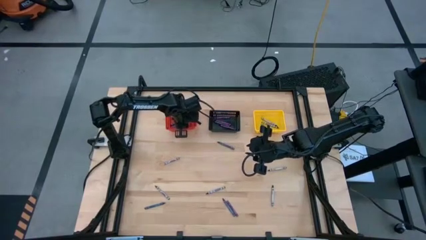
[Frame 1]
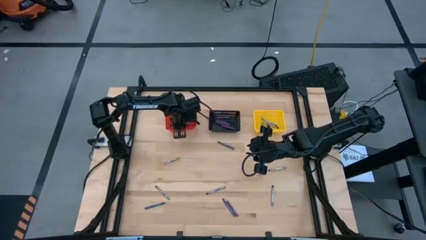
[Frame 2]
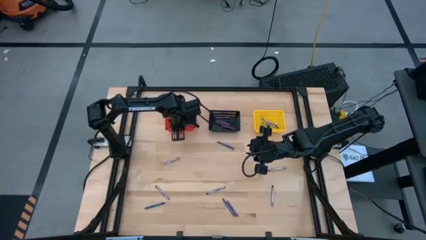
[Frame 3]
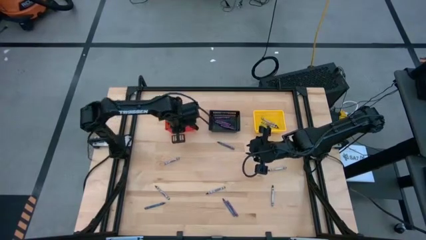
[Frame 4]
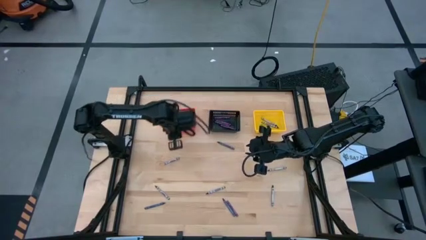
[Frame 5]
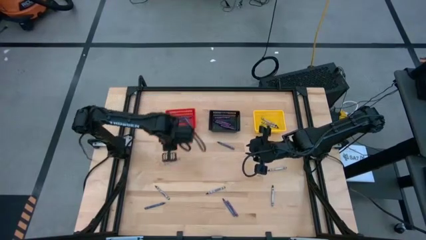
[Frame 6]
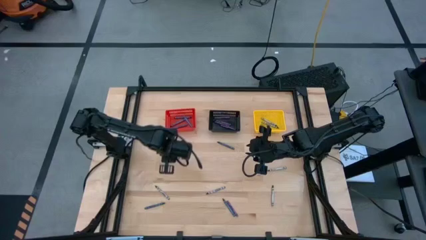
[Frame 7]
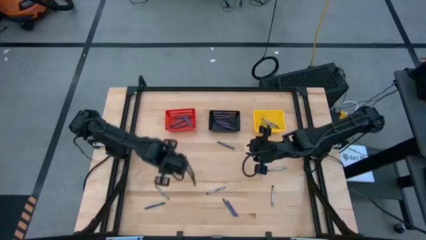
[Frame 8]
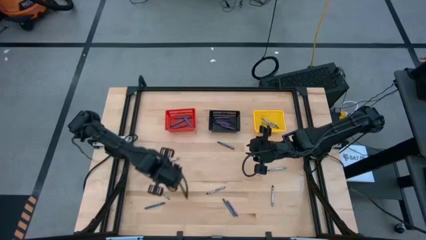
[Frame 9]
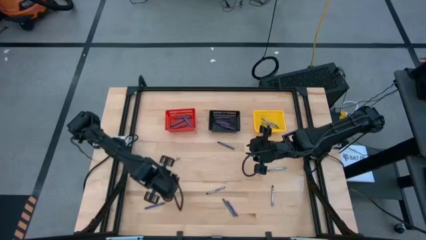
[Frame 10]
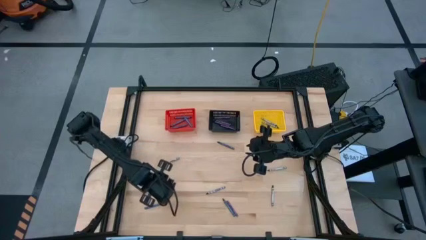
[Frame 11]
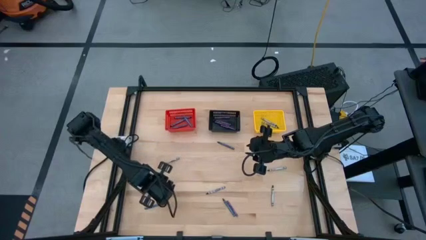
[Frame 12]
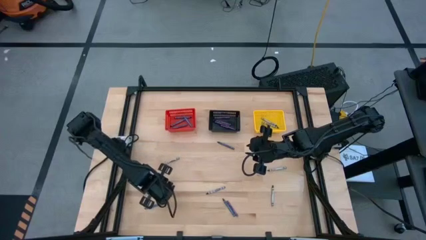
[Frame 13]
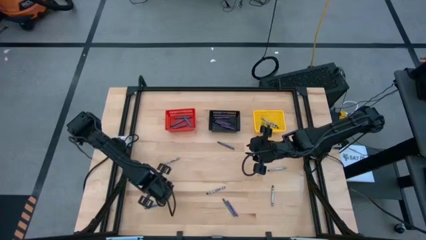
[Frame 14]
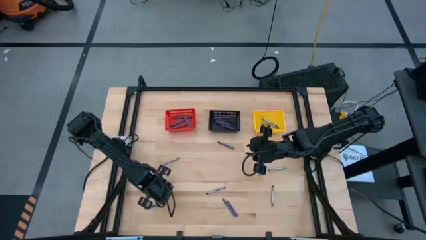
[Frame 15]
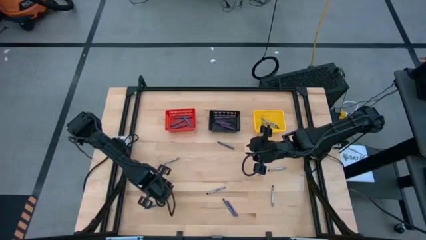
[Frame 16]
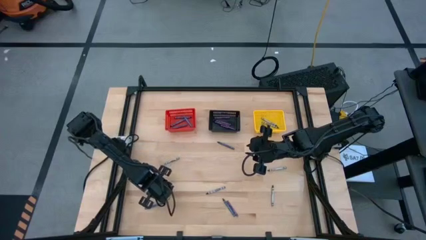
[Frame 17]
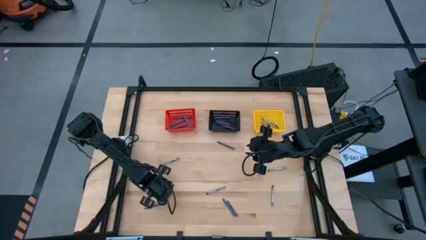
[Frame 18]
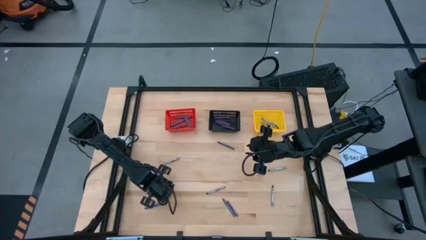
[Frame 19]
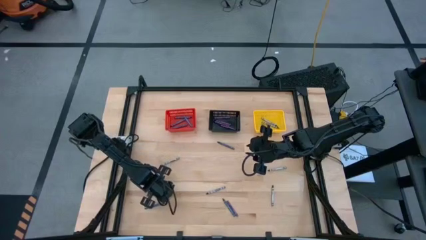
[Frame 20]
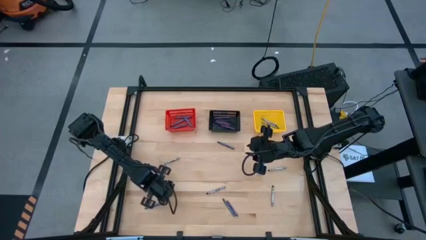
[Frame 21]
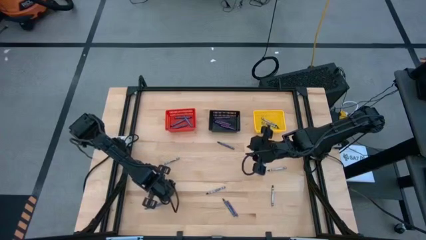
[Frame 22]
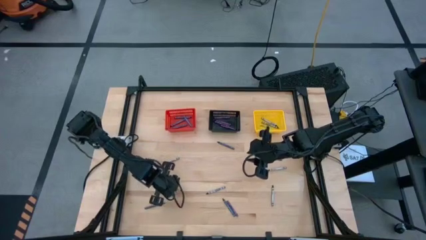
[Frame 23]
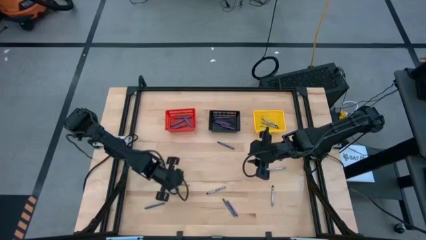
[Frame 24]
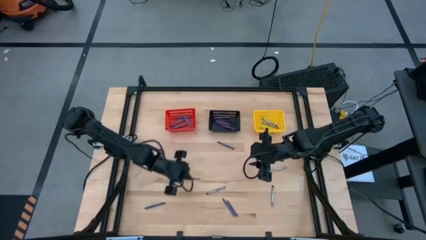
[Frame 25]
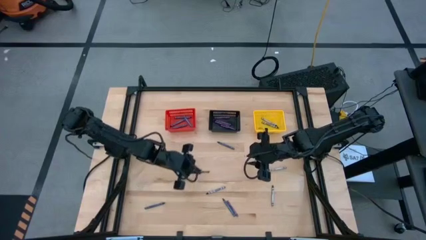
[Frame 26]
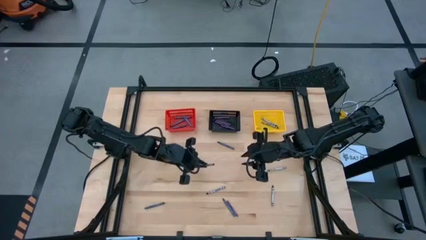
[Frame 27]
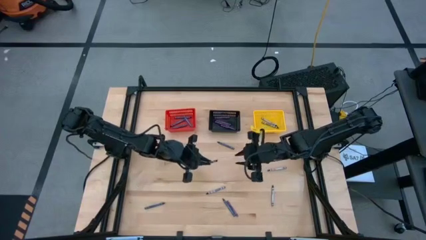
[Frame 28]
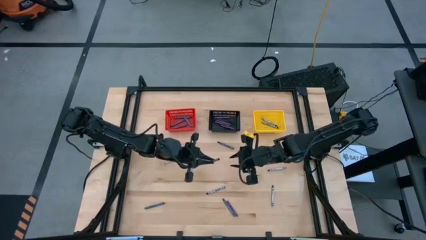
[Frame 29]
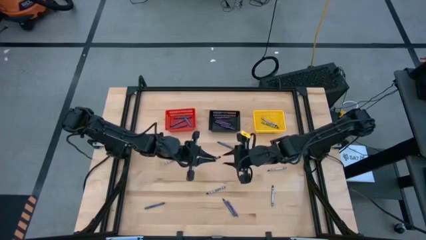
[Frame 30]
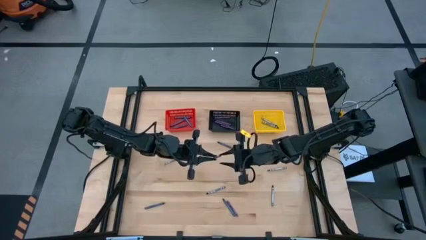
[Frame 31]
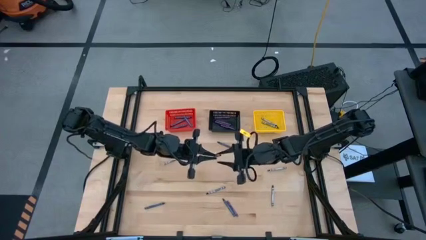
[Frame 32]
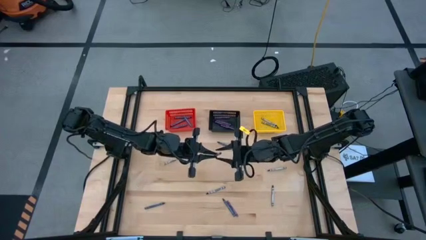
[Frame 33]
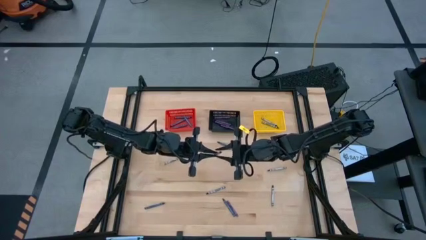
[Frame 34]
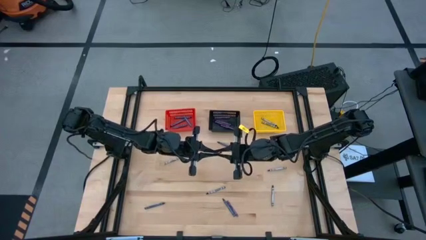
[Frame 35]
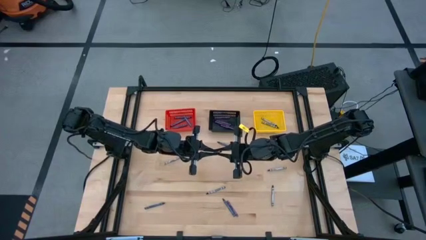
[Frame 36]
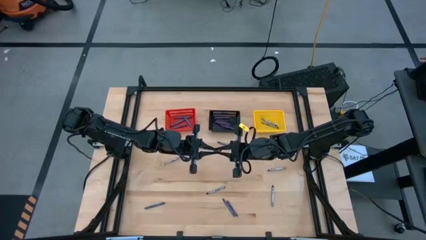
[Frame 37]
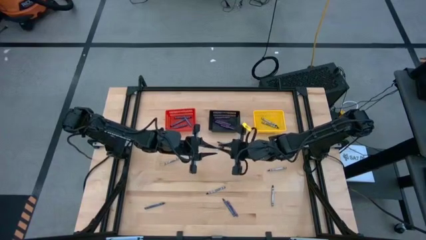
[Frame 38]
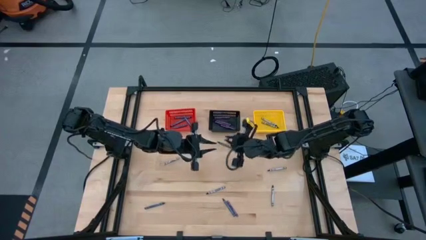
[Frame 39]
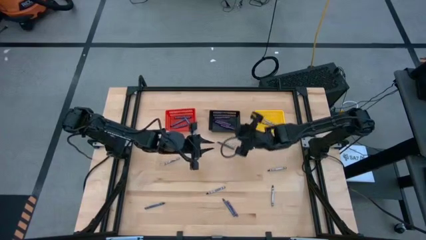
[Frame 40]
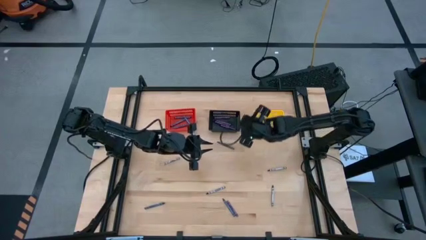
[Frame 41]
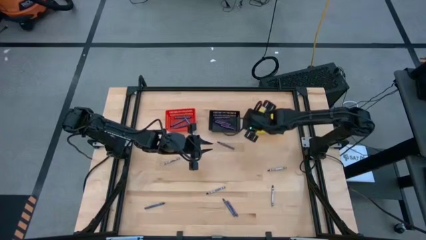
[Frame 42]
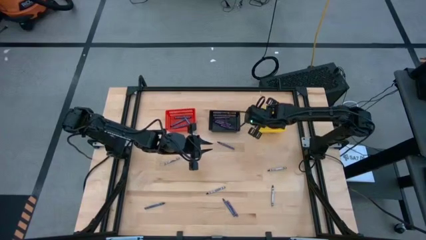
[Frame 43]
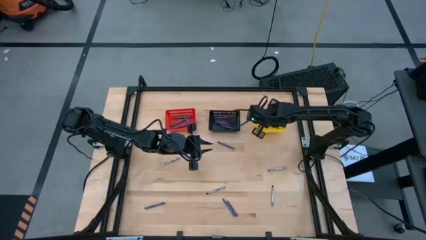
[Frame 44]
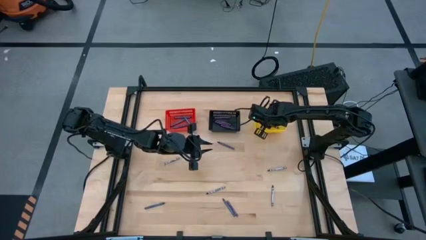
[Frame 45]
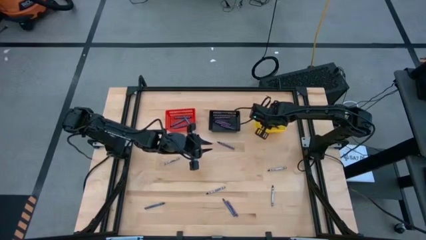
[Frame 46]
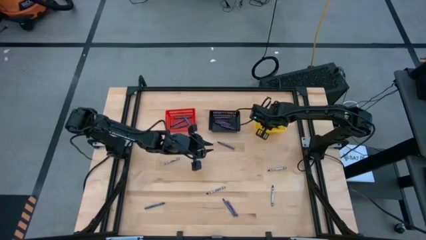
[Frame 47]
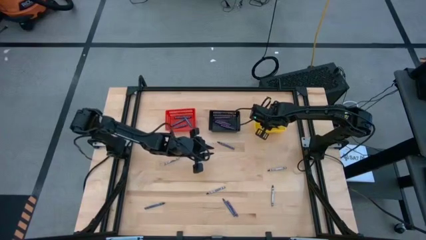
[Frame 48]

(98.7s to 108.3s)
Task: Sort crayons
Put the black crayon into the yellow bin

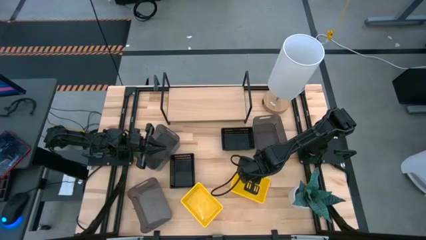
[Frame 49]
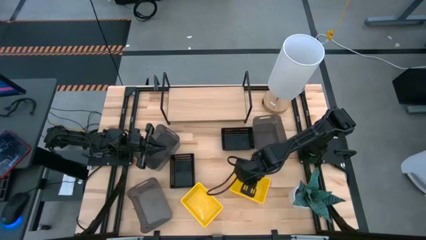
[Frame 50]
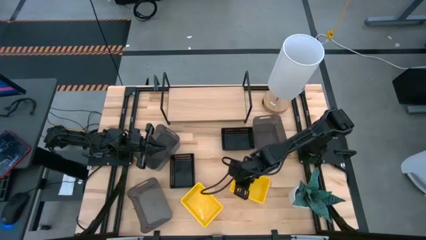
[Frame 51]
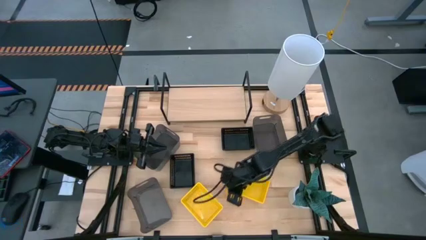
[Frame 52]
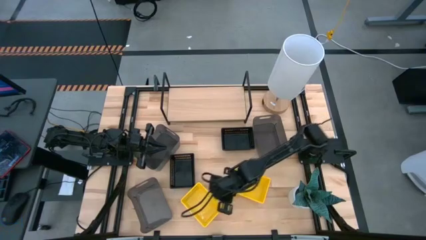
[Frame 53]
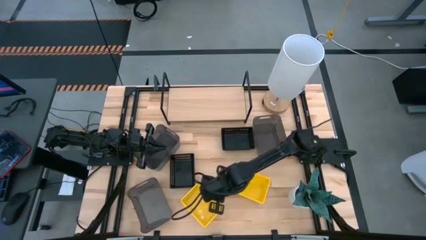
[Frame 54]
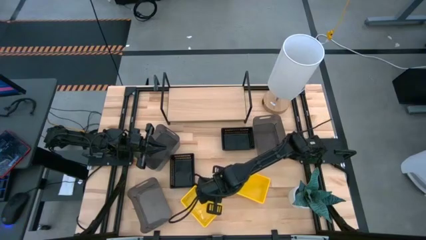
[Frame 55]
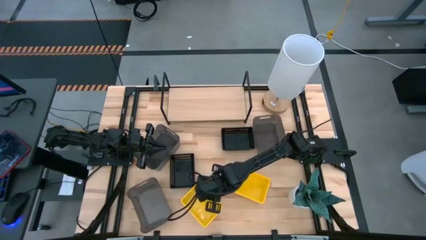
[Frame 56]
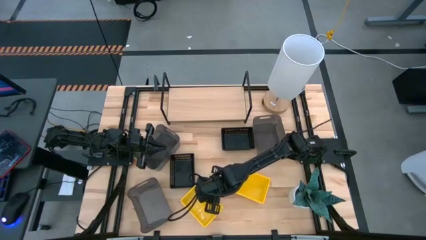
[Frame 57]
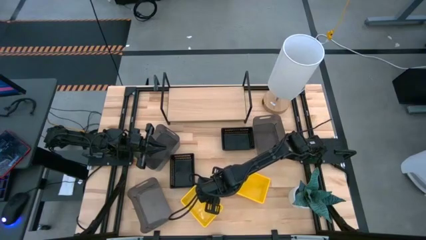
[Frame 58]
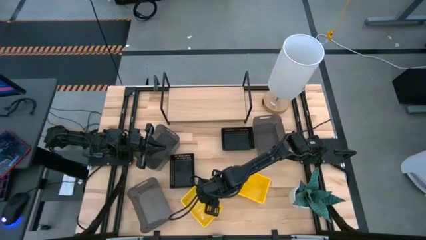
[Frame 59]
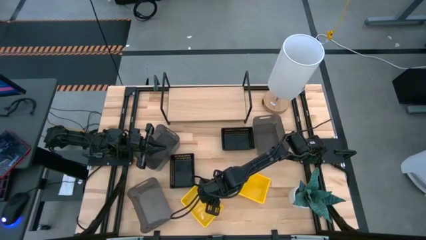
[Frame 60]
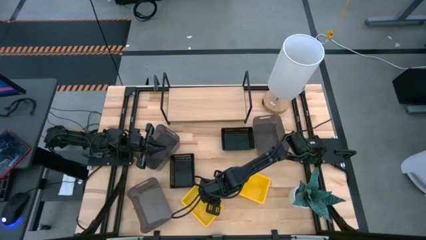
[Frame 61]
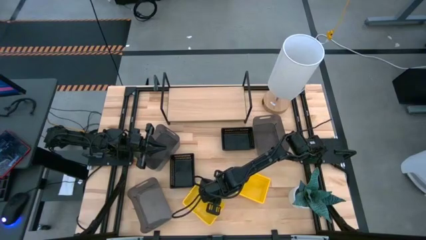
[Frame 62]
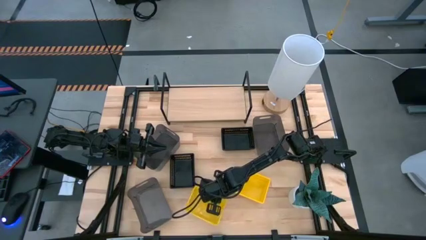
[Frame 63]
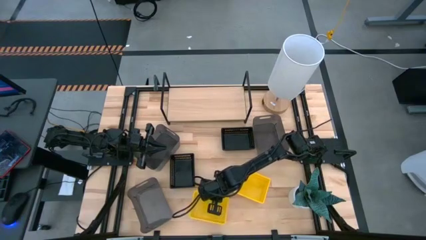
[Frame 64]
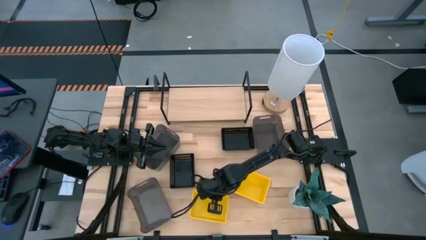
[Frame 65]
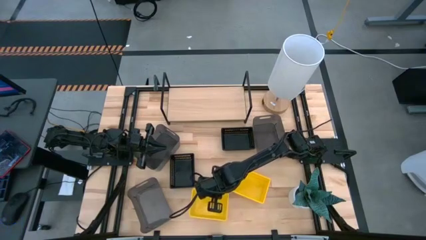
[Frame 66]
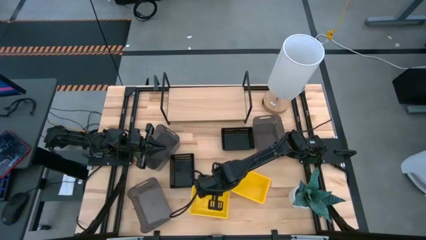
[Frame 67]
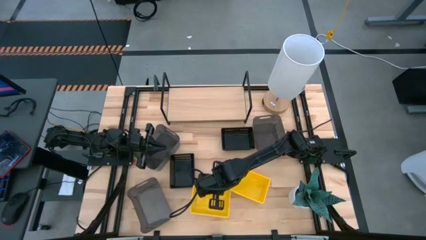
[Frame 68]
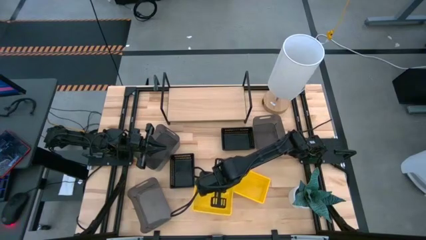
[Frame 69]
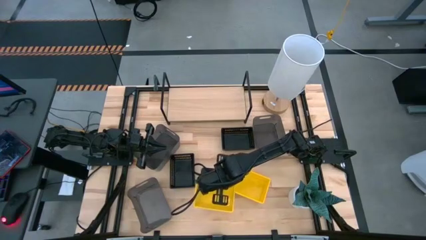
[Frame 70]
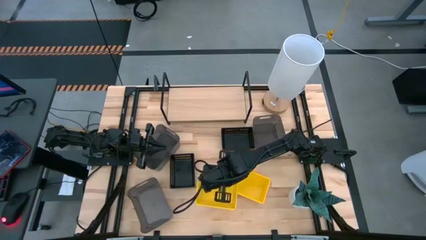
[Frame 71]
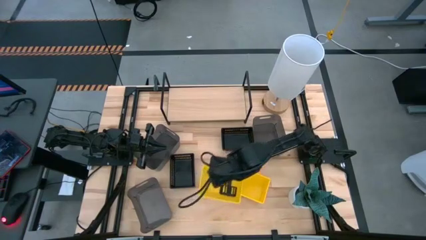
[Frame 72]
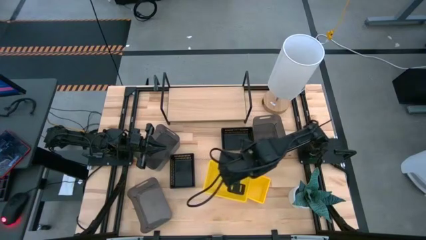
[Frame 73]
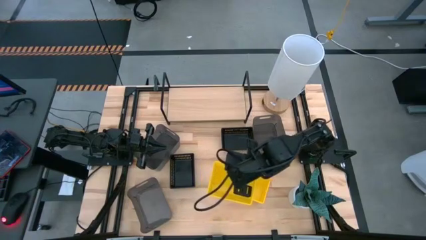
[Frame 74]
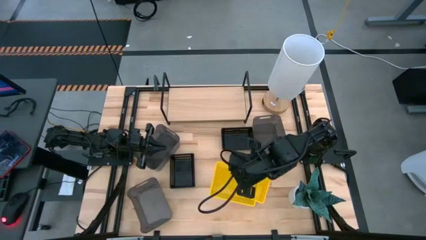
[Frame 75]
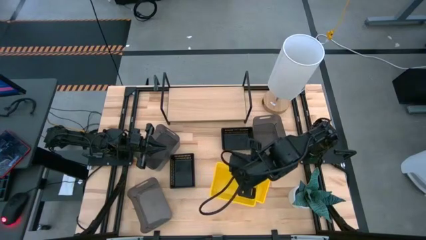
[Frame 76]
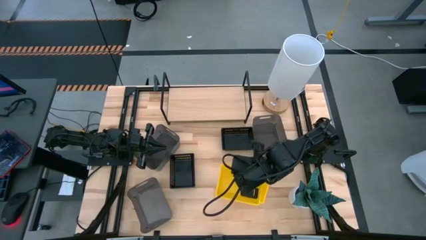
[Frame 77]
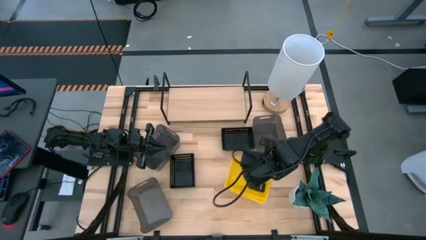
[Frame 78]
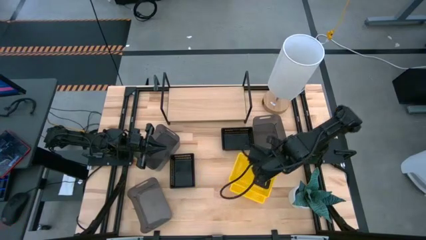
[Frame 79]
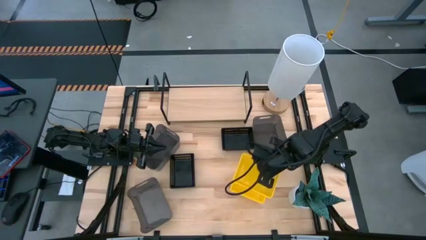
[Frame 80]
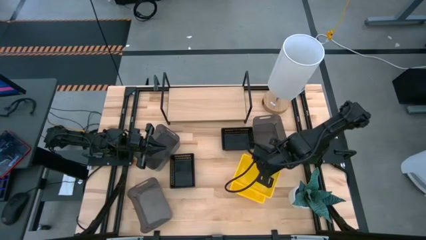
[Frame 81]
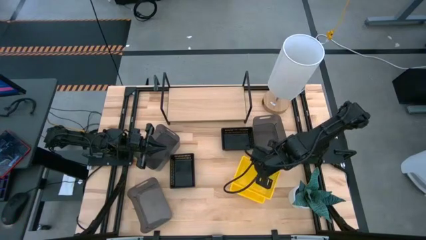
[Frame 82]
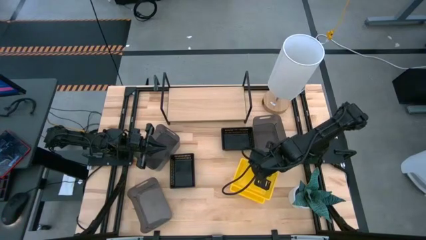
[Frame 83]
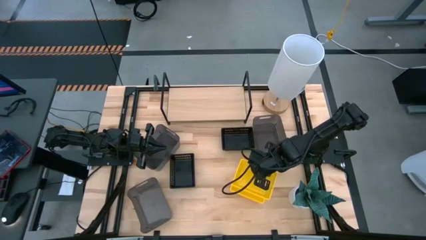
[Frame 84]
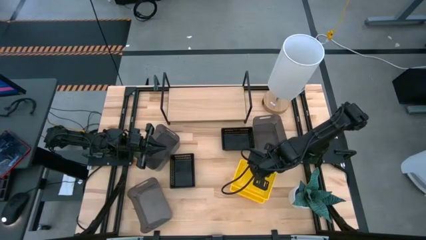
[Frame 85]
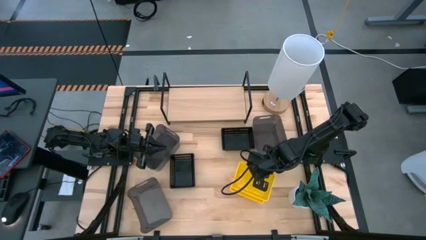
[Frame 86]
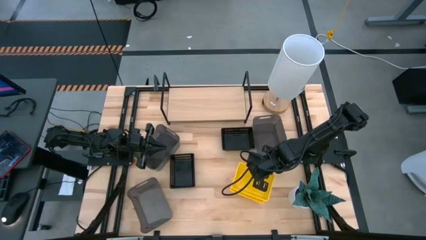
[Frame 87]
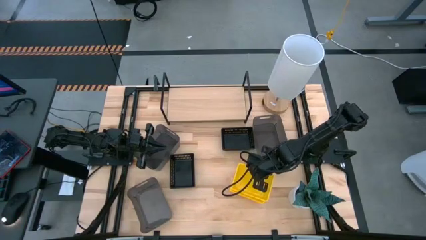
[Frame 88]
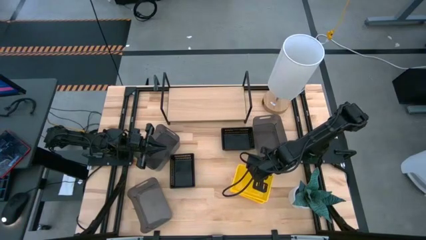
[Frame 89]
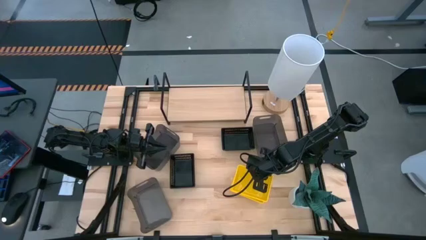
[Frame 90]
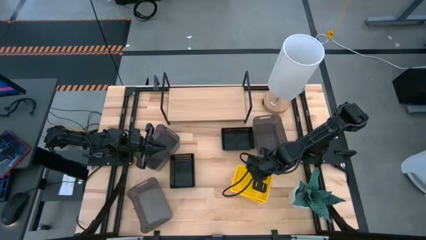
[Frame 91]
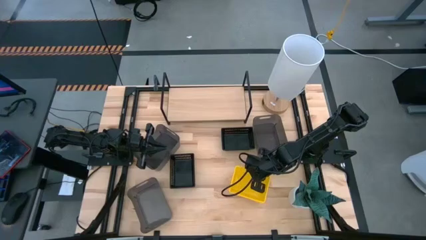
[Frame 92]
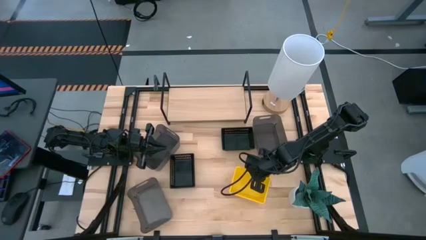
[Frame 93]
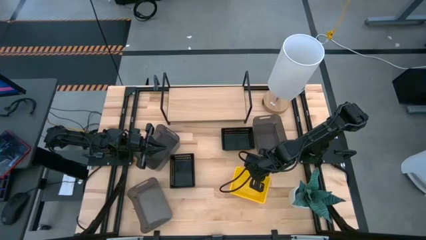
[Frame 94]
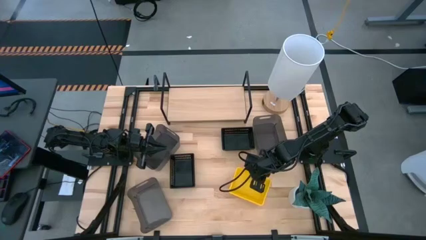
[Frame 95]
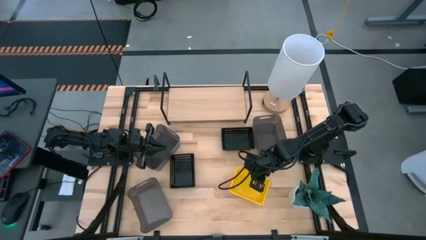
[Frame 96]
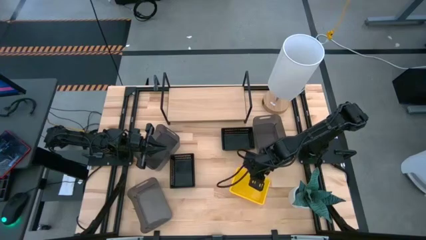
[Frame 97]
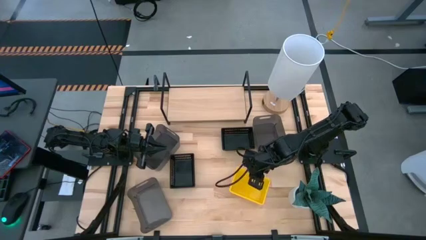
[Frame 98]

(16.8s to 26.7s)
Task: Stack baskets on shelf by color
Stack the left yellow bin on top of the yellow bin
